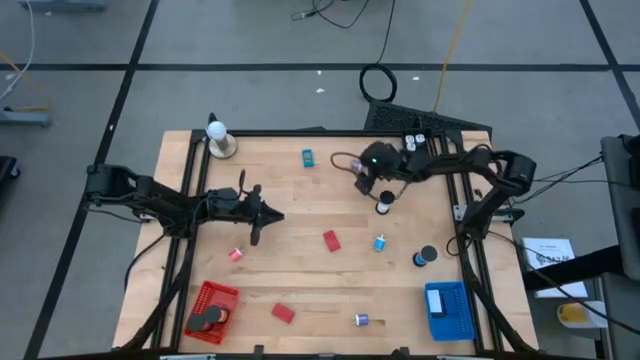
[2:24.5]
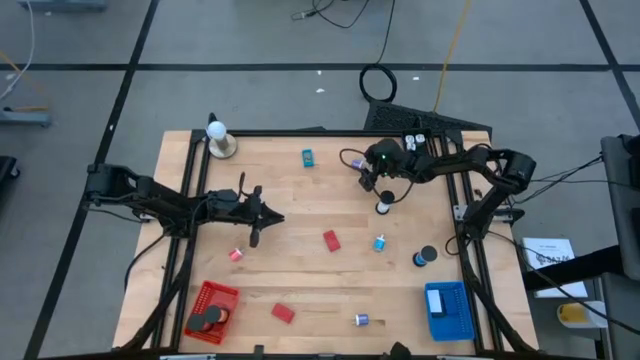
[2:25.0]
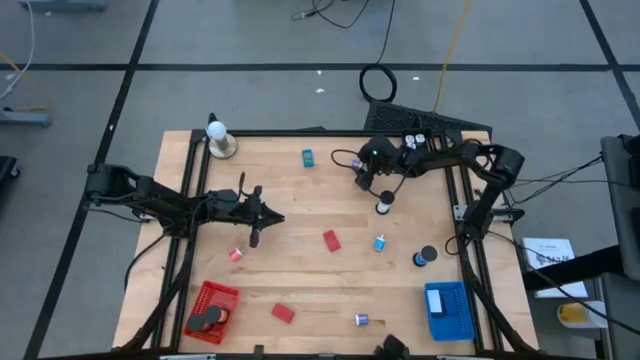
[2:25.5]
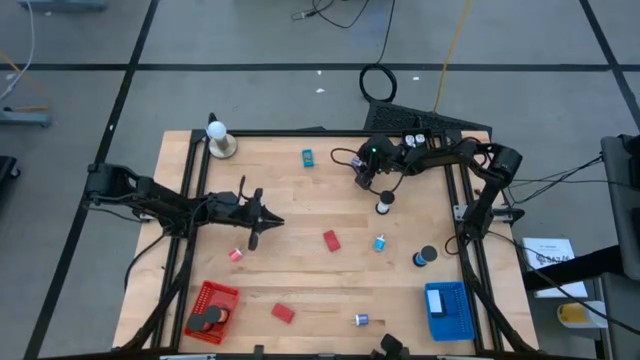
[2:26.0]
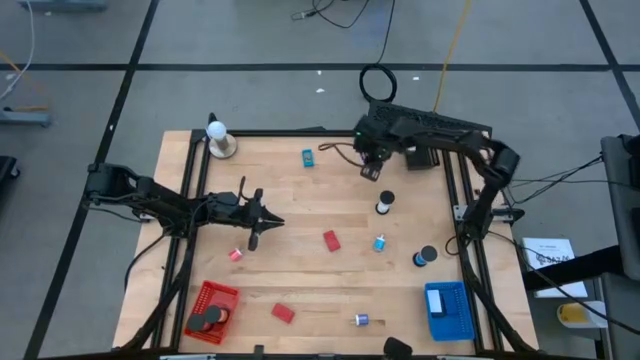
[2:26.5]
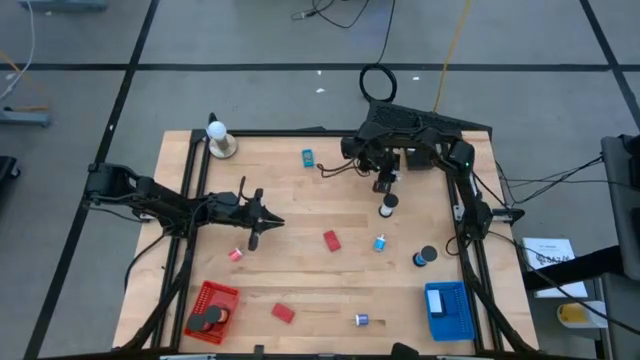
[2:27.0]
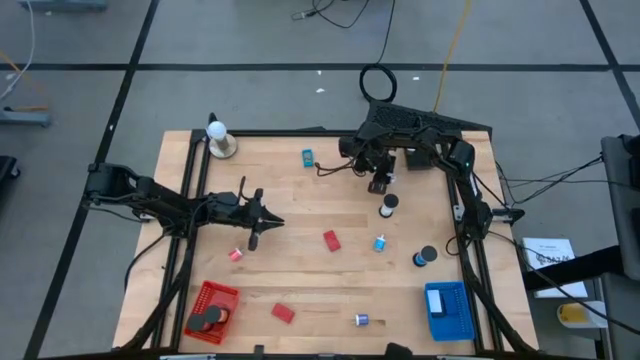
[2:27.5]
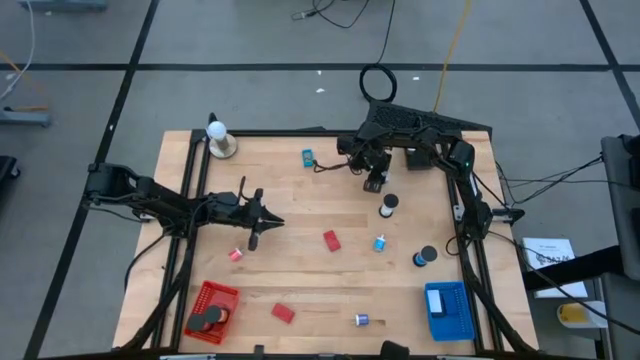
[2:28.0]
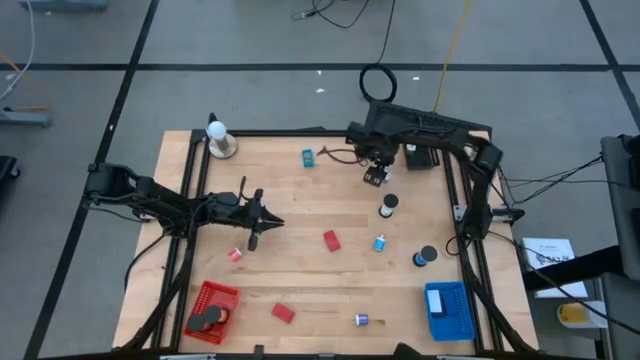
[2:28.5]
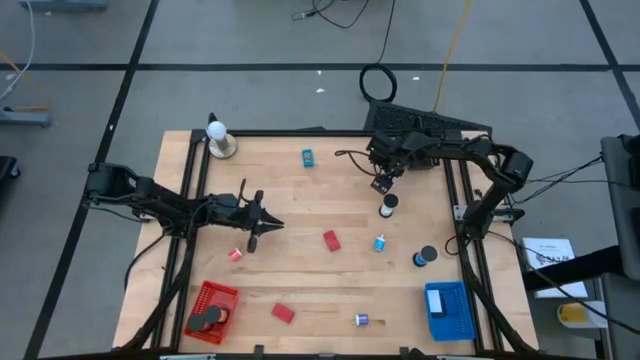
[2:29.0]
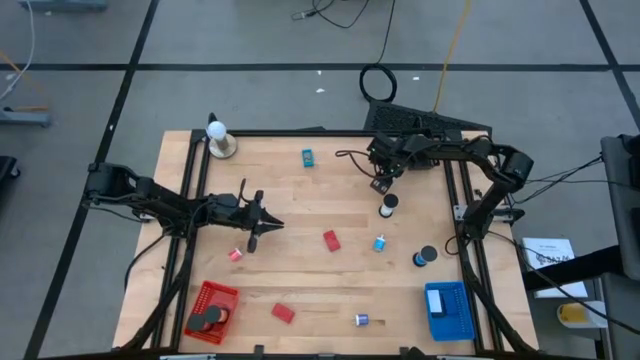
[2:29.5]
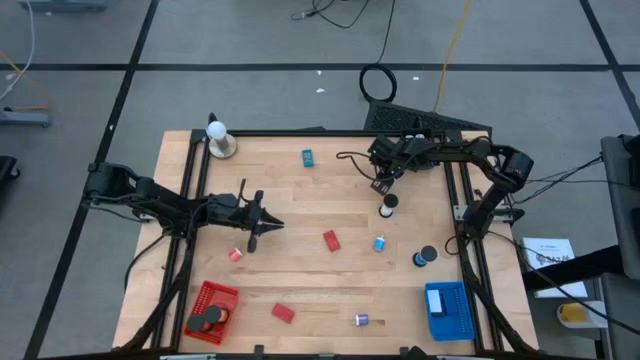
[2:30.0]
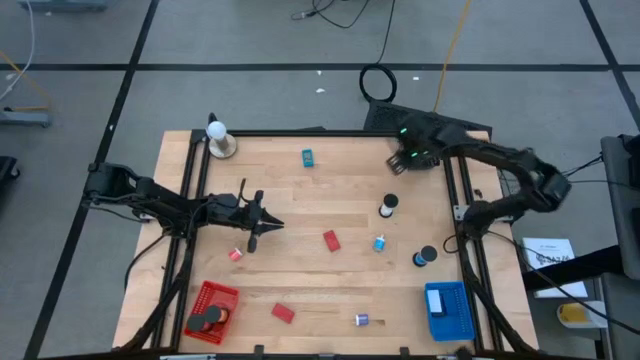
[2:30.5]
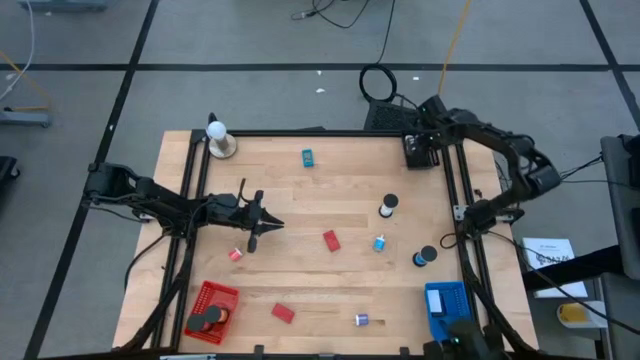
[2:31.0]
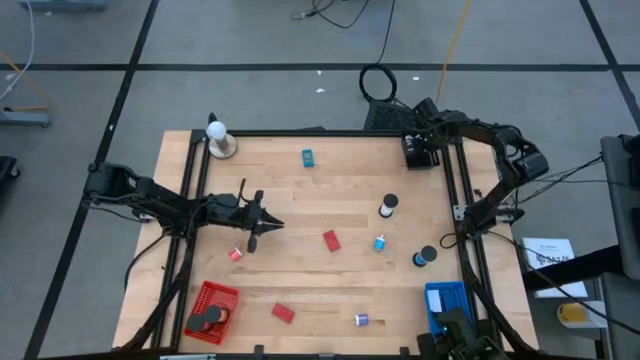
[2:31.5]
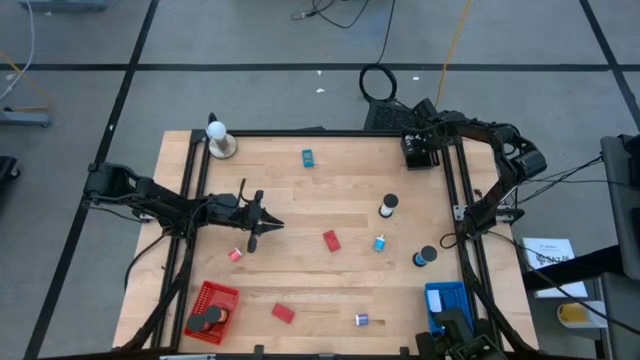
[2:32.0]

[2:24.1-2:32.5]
Task: Pick & Place Office items
Put the violet charger adapter into the black bin

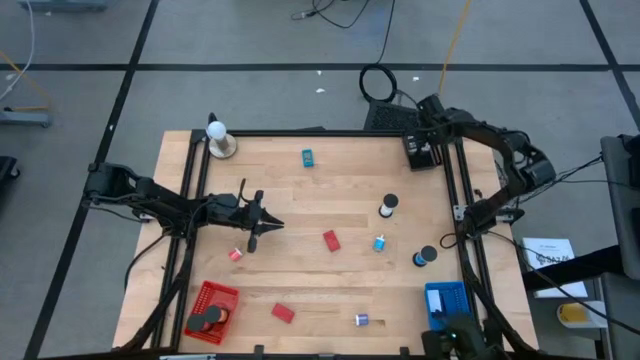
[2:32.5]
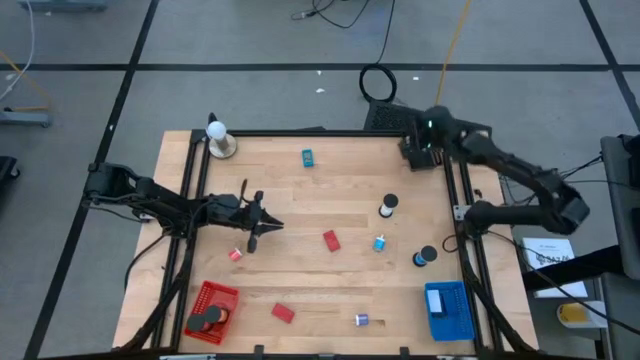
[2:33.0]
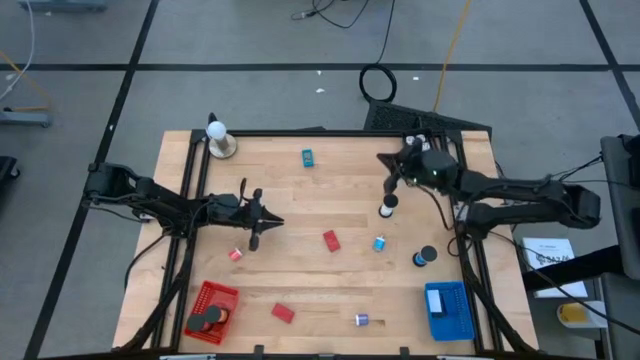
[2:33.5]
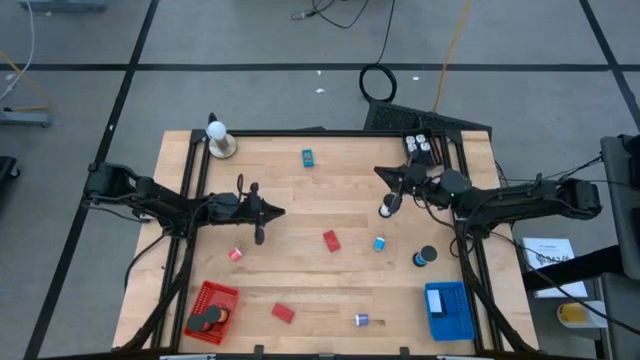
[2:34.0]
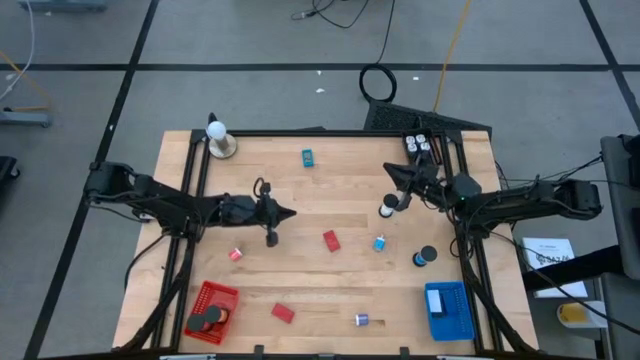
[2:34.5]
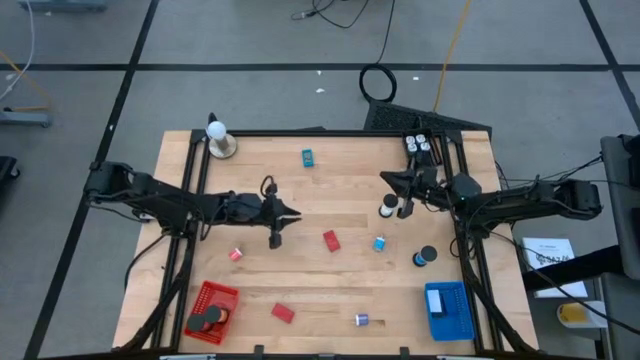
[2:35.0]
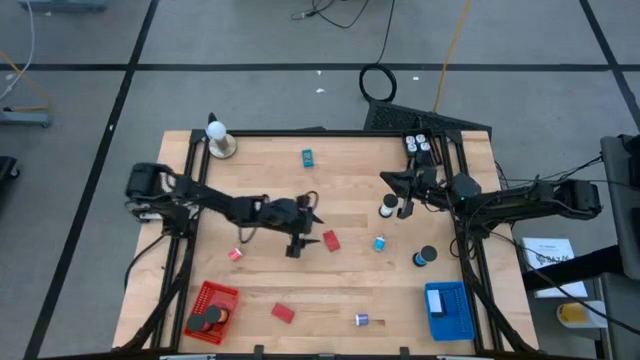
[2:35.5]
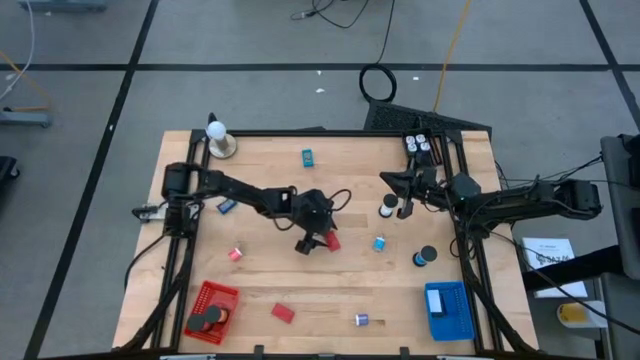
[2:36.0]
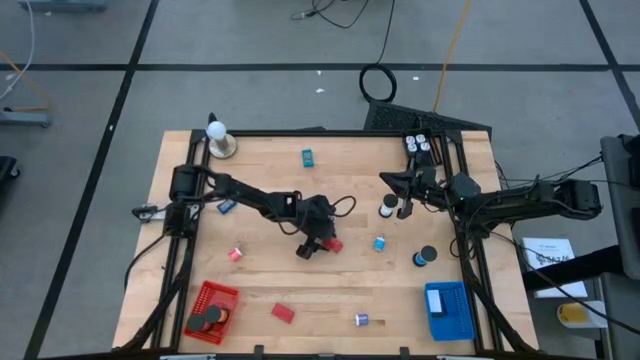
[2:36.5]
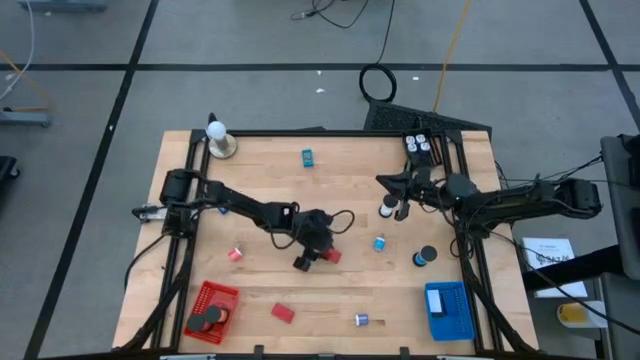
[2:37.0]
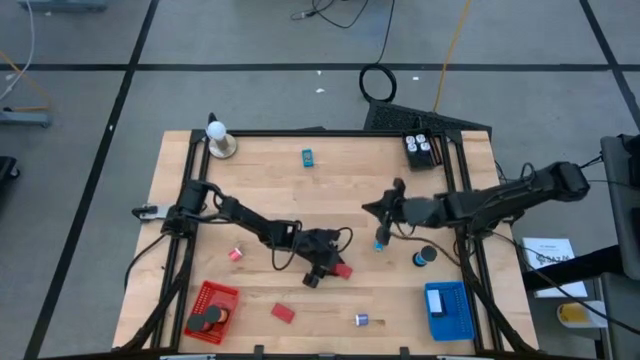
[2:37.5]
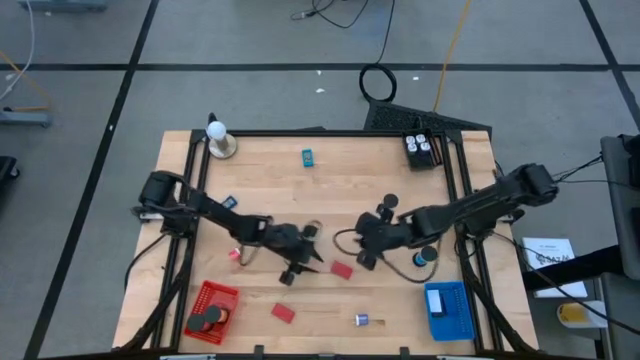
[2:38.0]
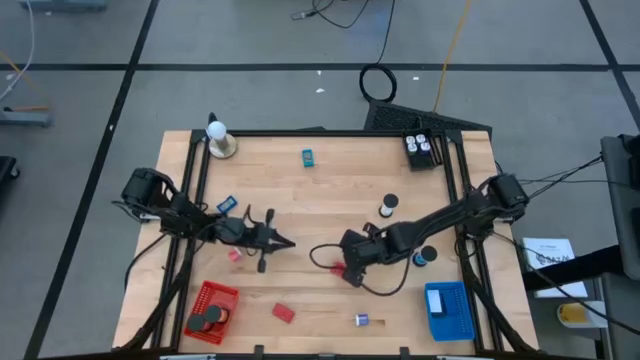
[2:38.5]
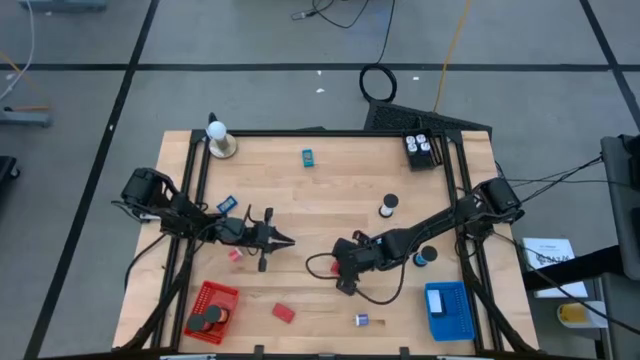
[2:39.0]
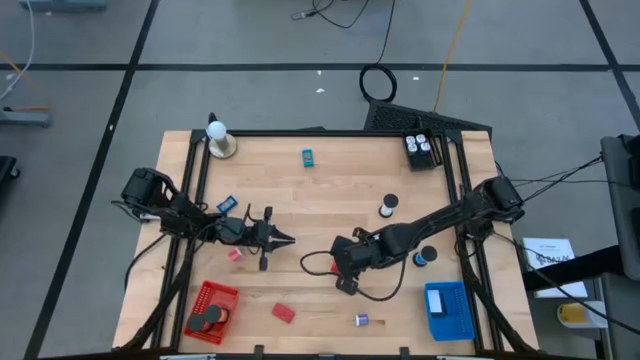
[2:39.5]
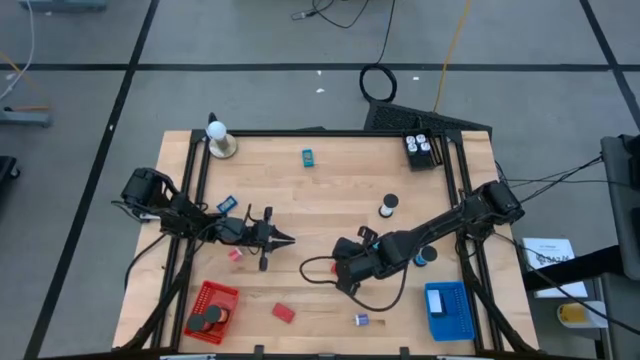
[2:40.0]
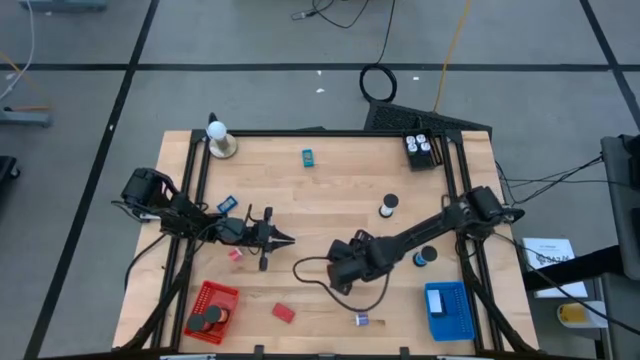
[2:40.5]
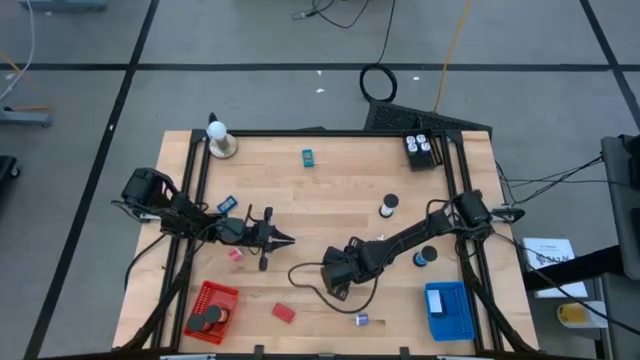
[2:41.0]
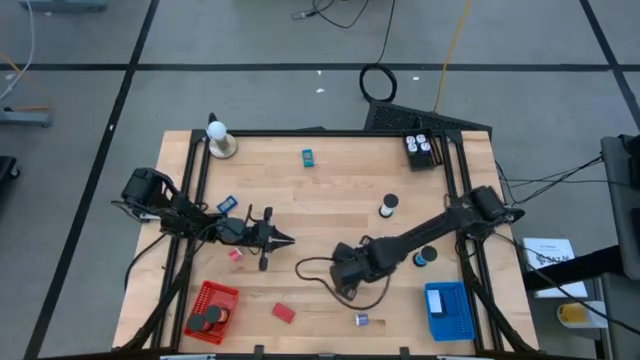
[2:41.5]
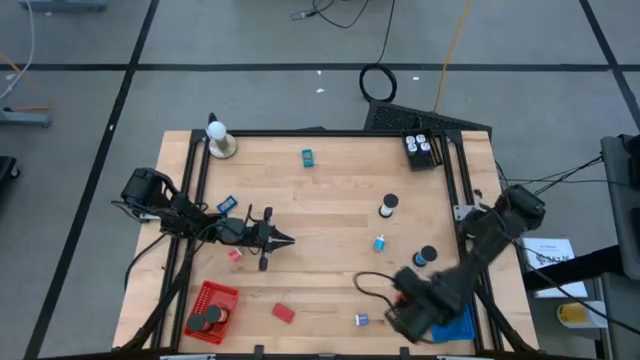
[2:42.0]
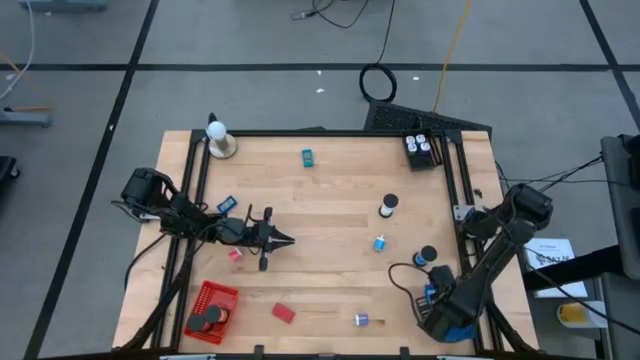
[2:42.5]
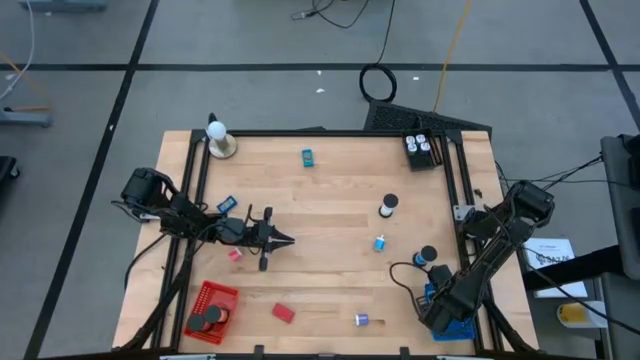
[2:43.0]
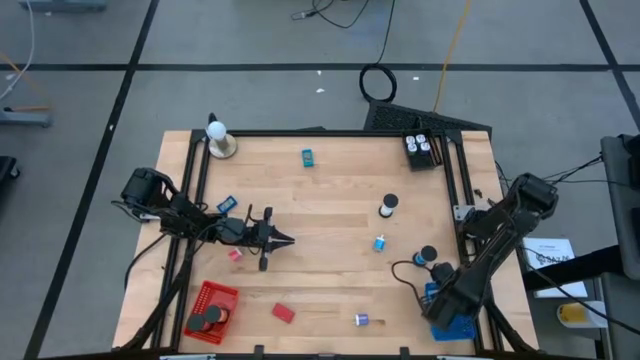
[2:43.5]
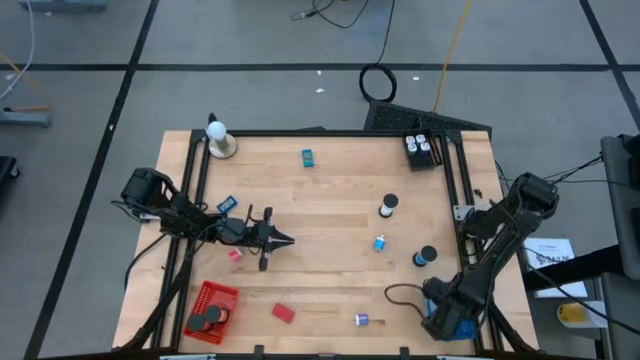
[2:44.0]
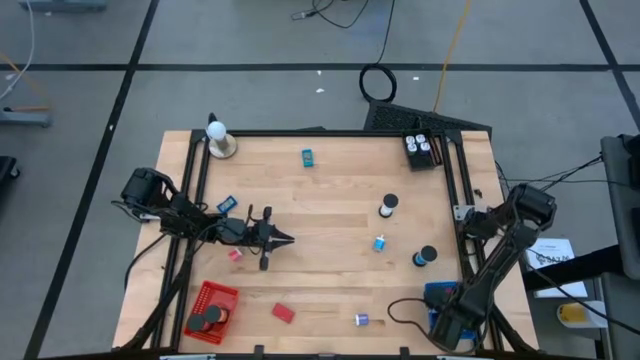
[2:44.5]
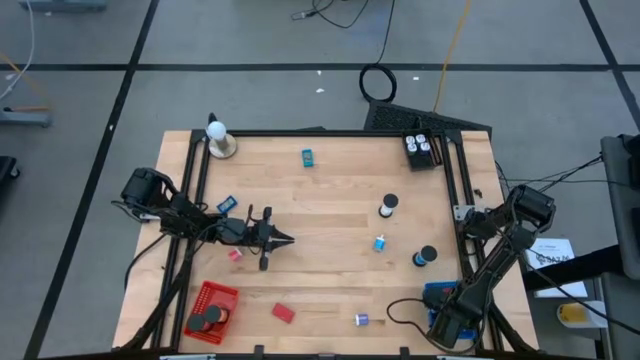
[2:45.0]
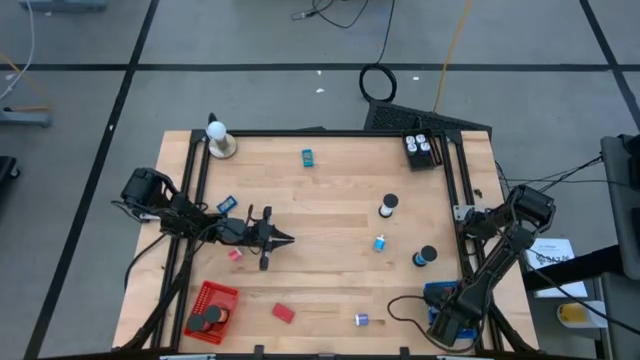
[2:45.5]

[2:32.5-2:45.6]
Put the red digital clock into the blue bin
